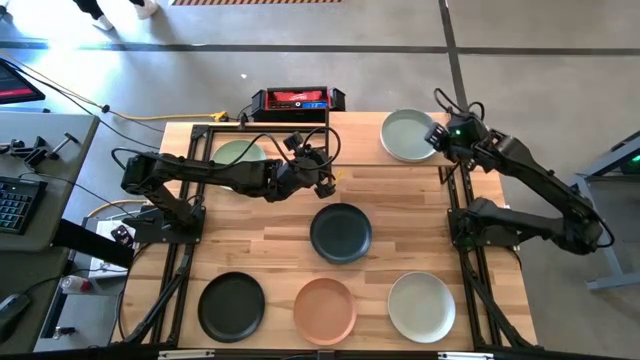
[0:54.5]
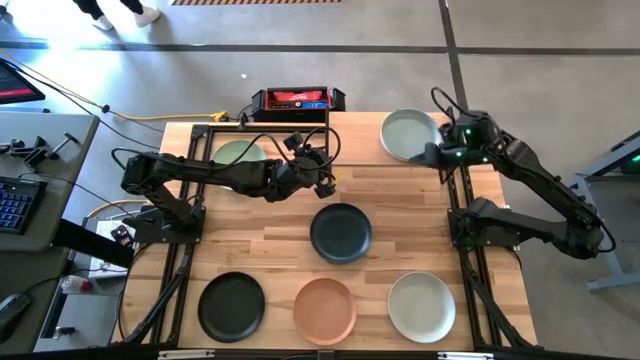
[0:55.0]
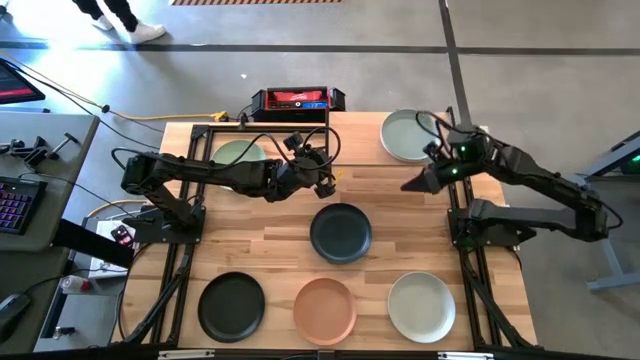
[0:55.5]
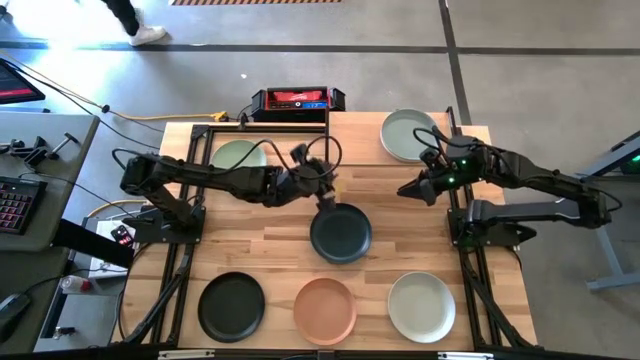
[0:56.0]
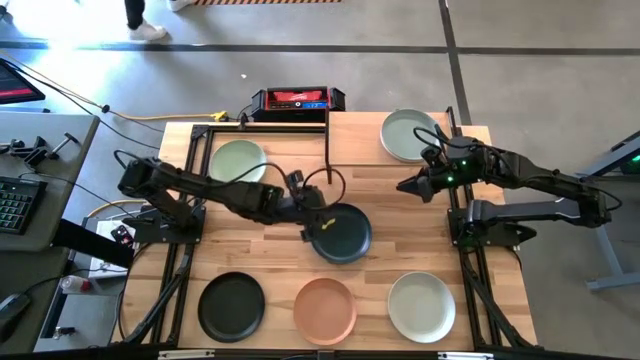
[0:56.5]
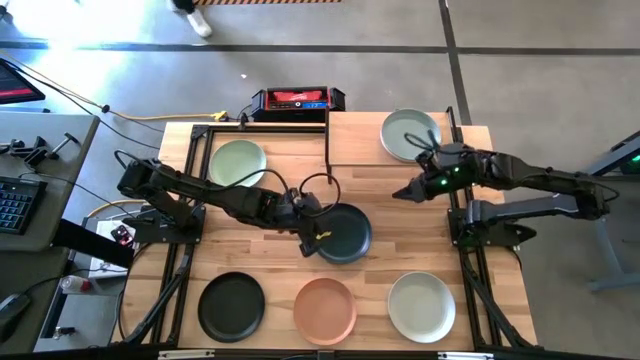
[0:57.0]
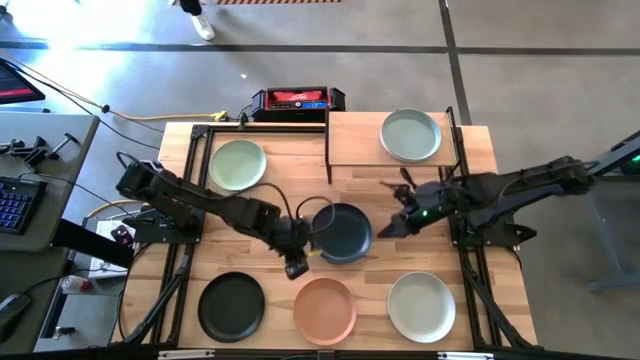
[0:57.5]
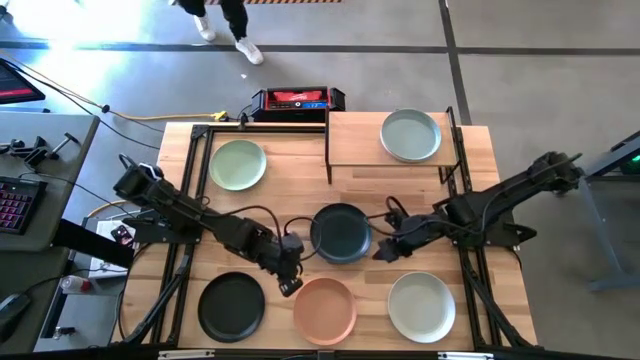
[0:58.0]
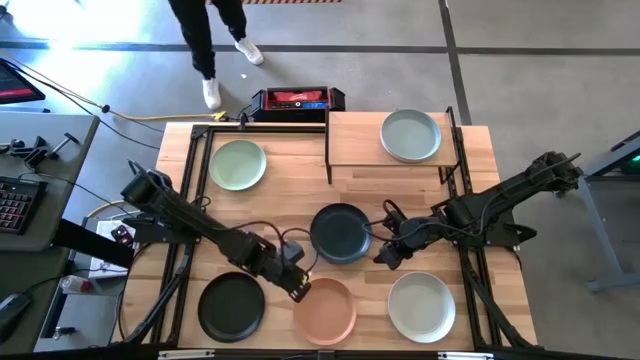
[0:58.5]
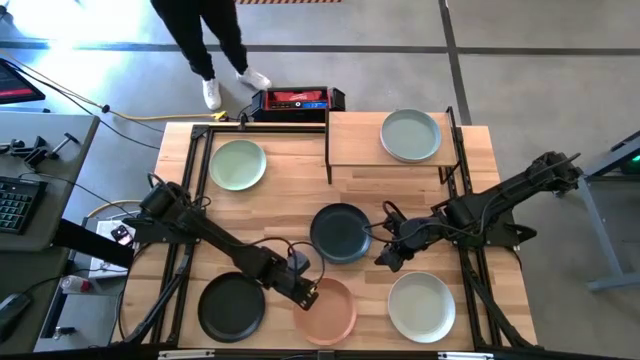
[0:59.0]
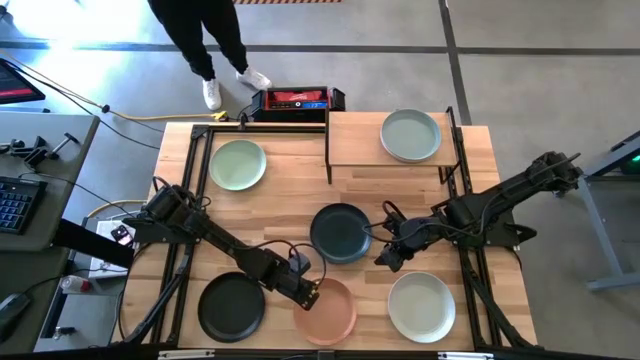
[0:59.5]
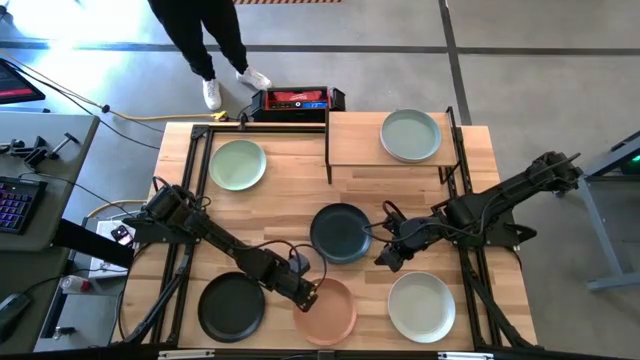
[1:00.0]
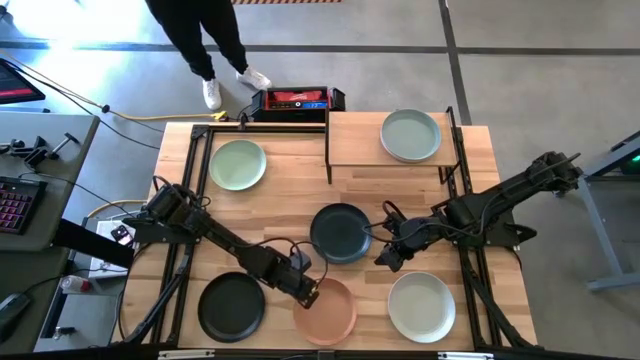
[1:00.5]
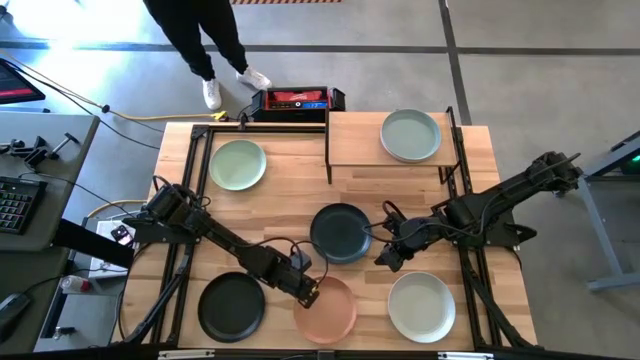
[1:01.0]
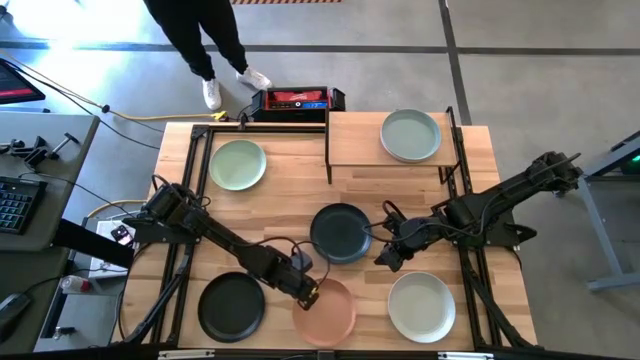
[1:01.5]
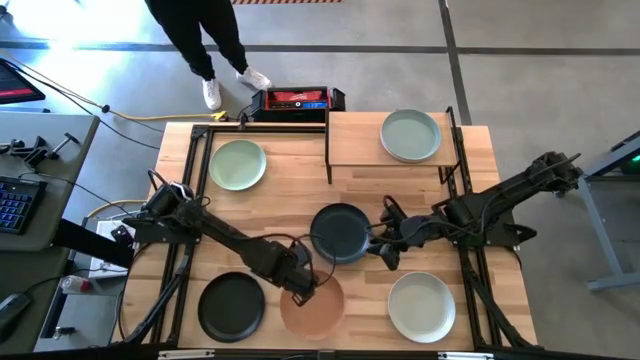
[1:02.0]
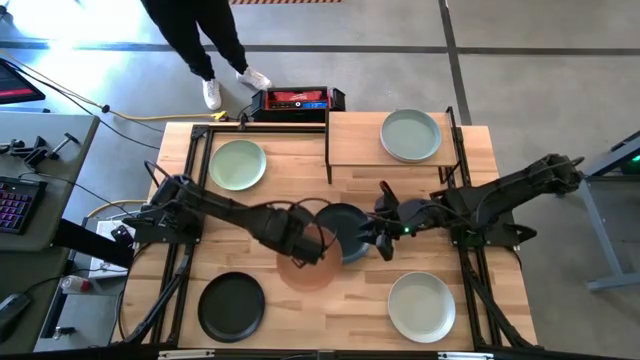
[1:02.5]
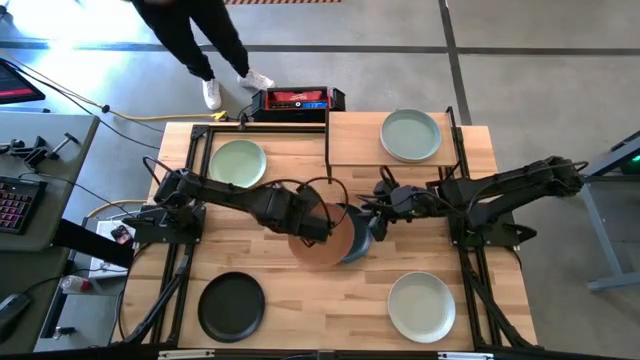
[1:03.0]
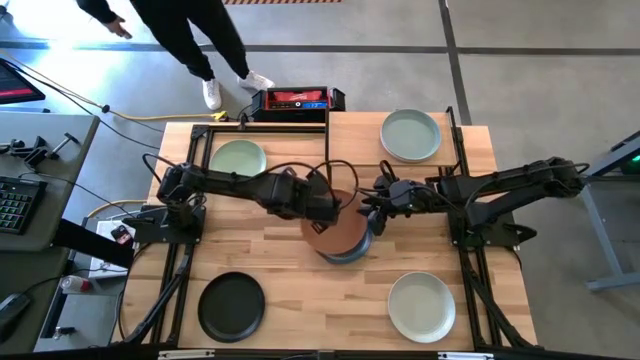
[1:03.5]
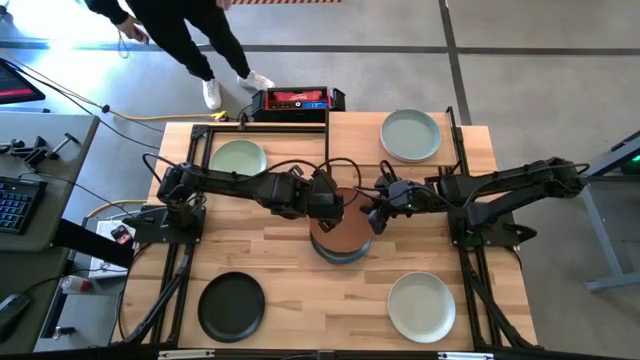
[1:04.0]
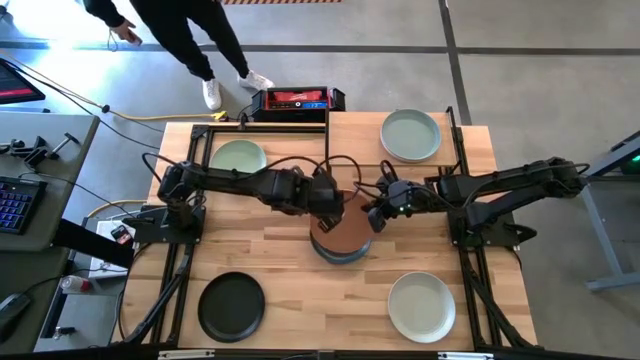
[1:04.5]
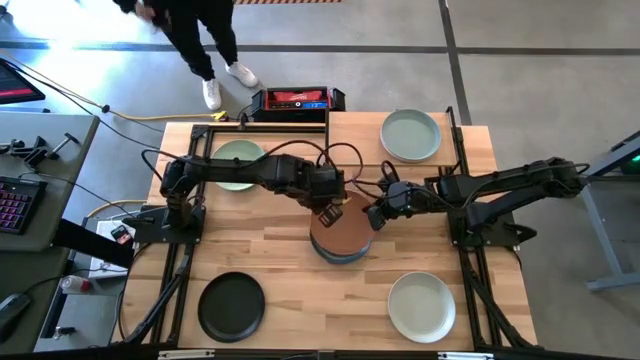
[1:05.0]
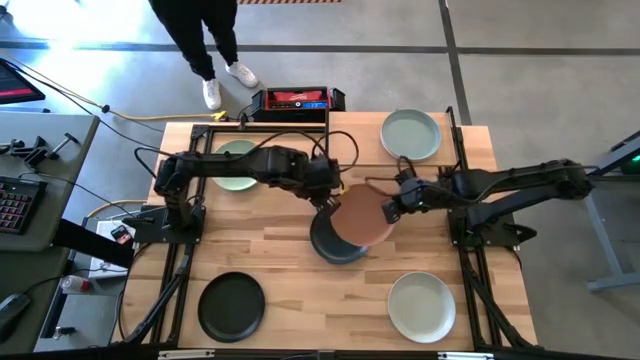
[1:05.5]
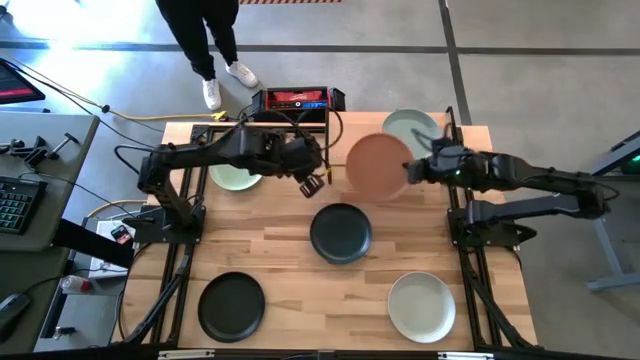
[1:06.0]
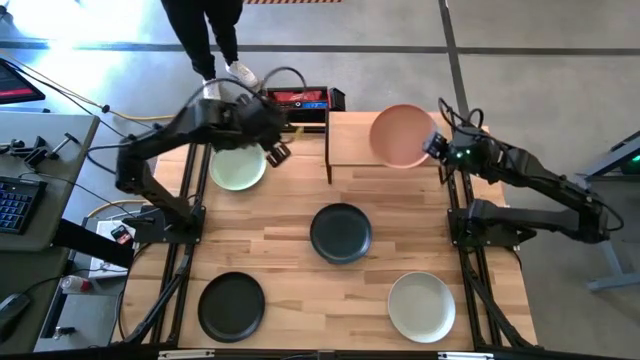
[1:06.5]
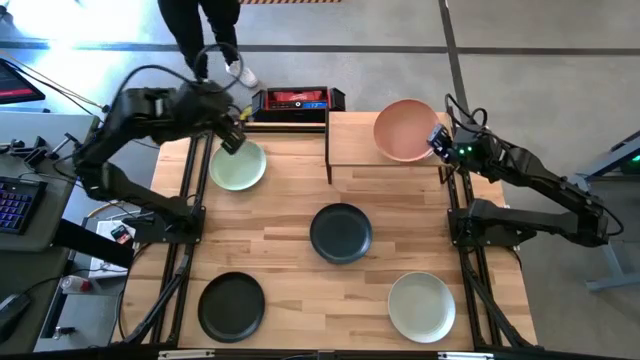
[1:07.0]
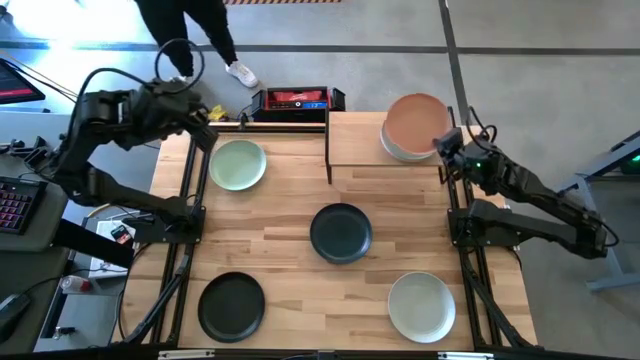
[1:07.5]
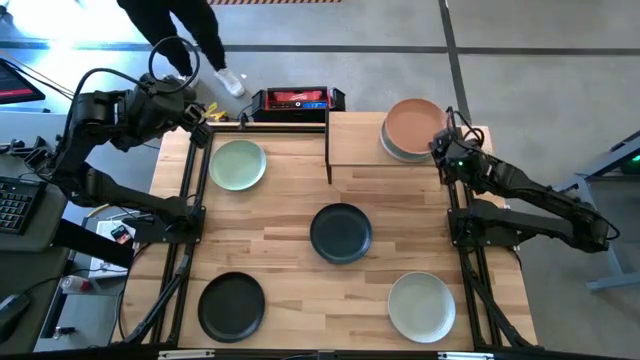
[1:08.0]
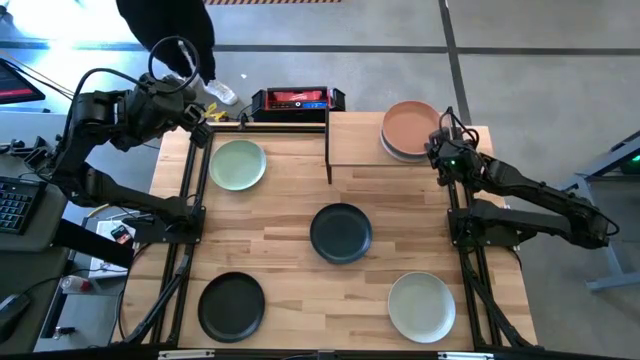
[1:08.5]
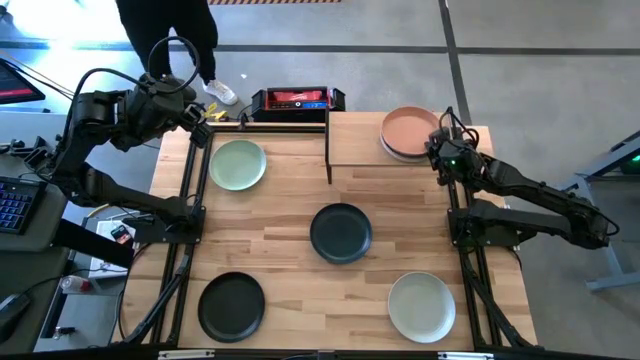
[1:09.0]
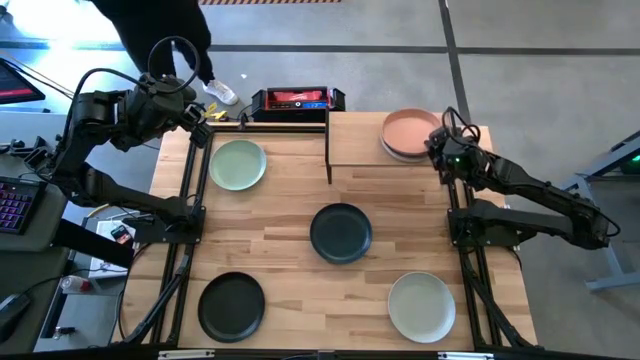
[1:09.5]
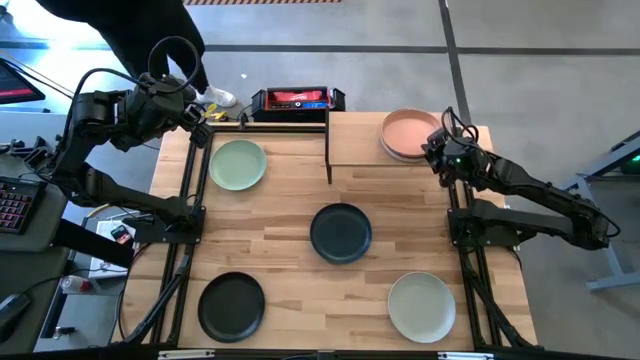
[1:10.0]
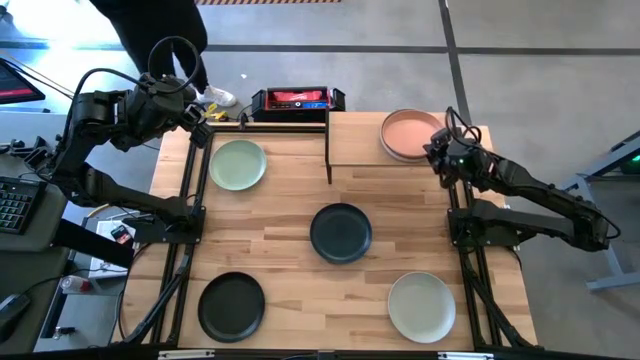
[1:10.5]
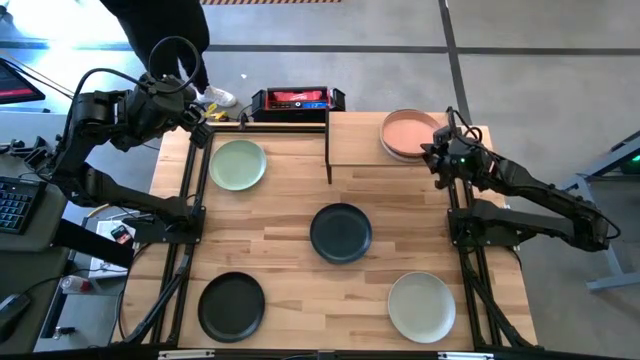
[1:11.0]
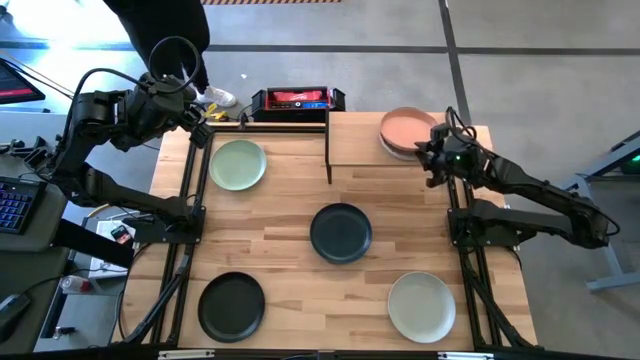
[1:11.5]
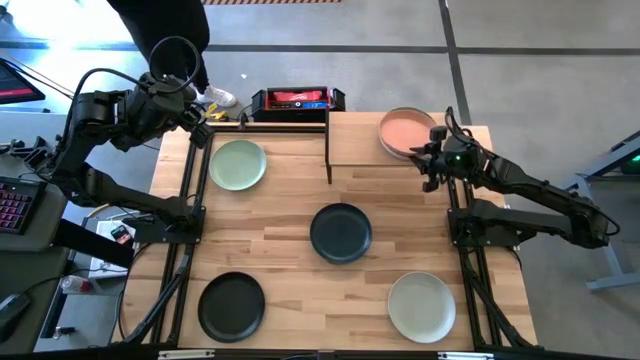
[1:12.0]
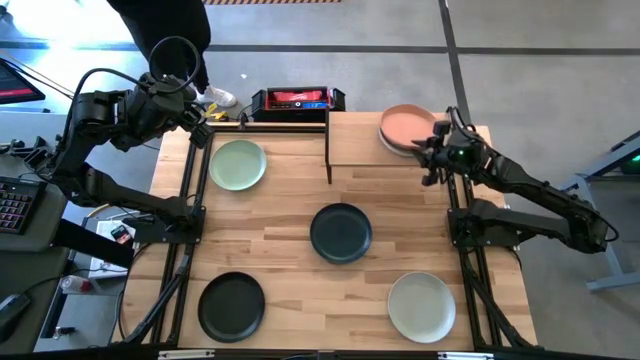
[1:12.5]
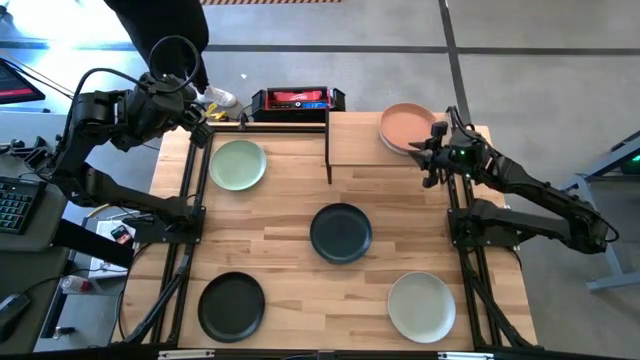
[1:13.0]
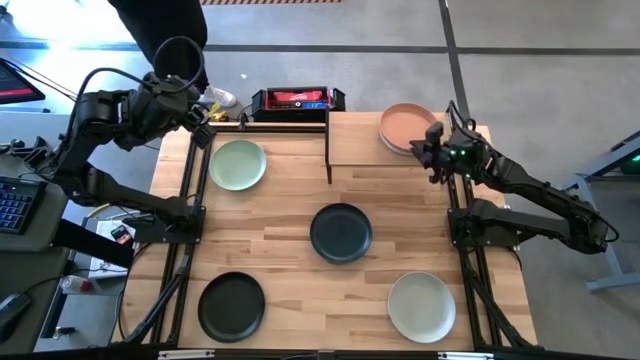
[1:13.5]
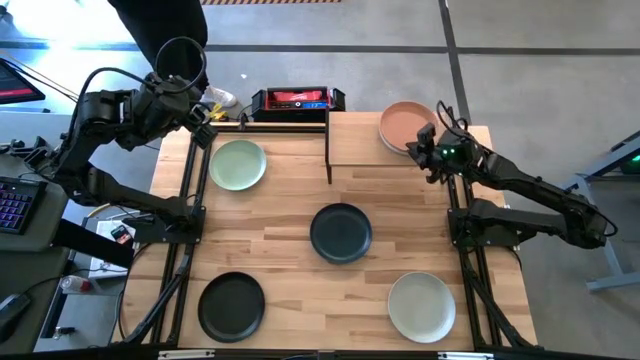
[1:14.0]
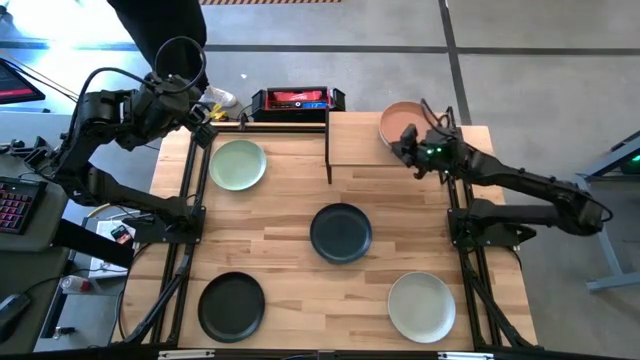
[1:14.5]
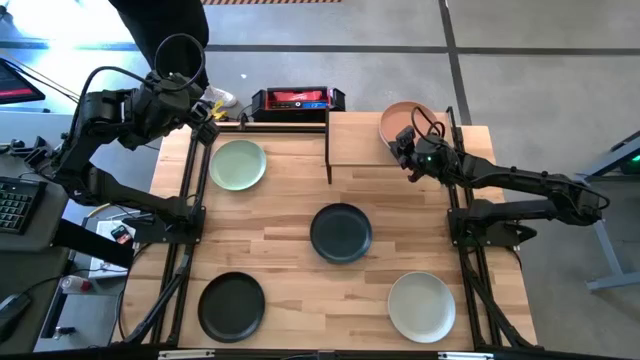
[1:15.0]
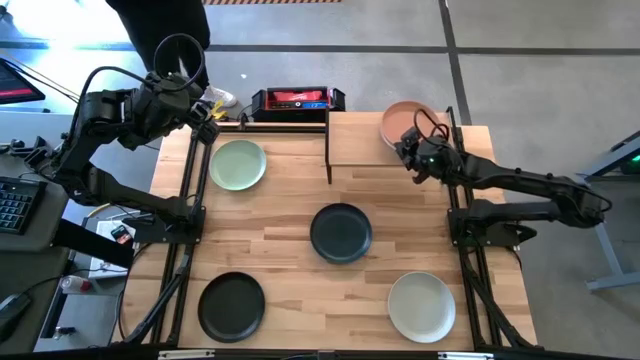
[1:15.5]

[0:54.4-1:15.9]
Task: Place and stack plates onto a shelf
Stack the brown plate on the gray plate on the shelf
